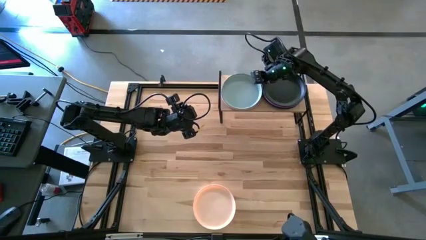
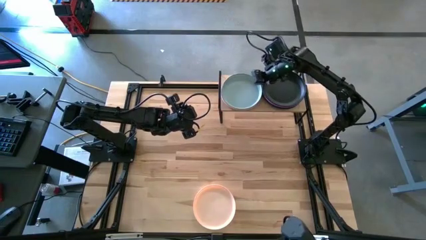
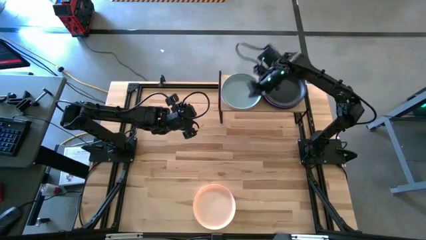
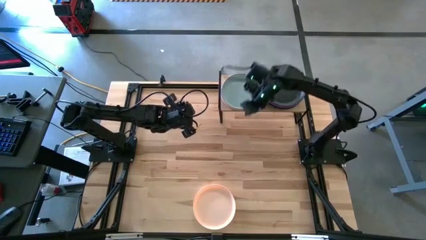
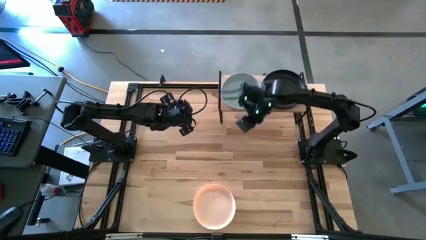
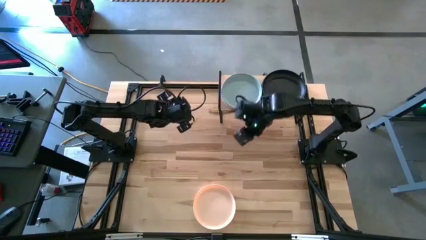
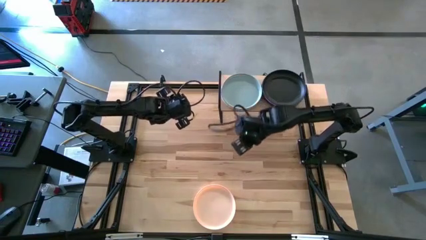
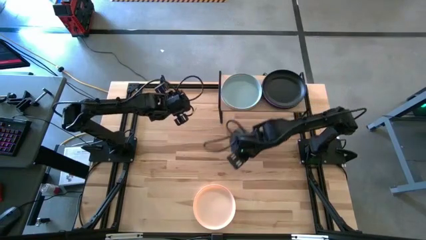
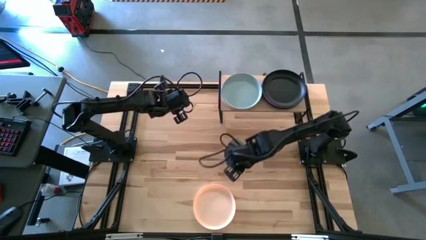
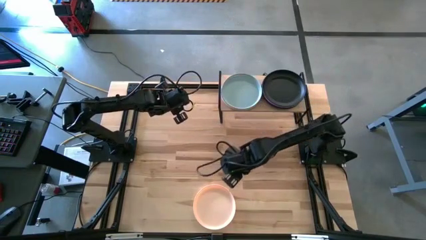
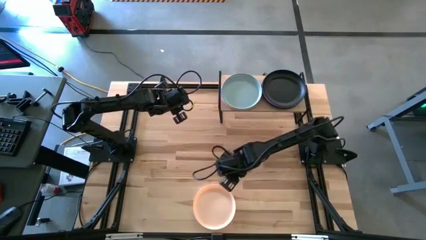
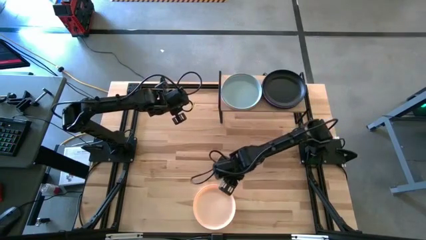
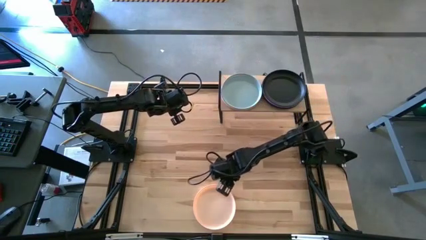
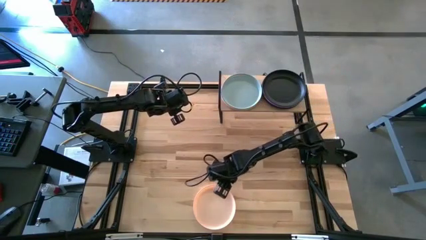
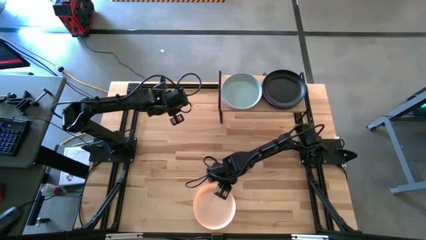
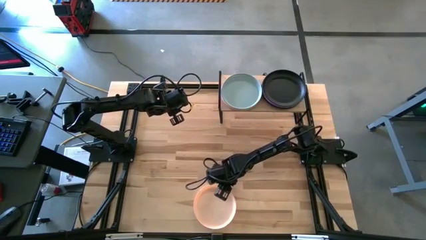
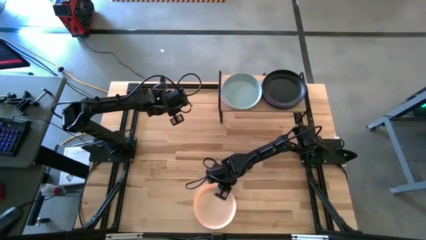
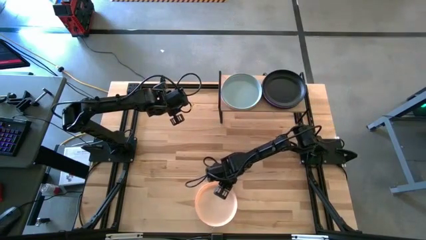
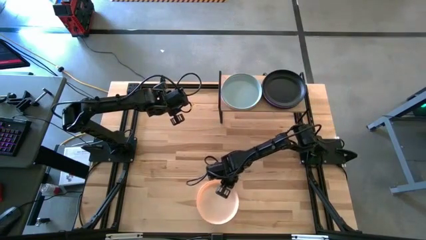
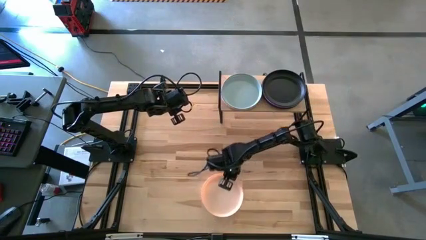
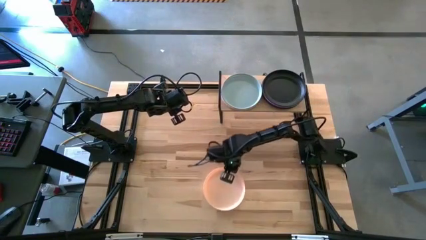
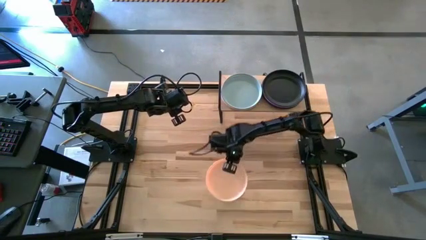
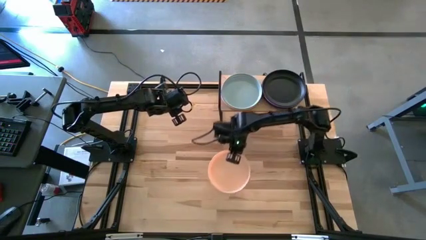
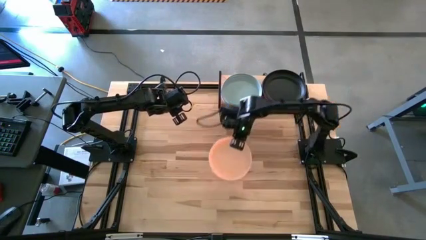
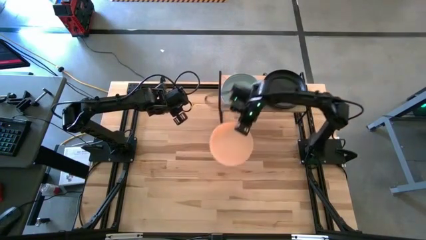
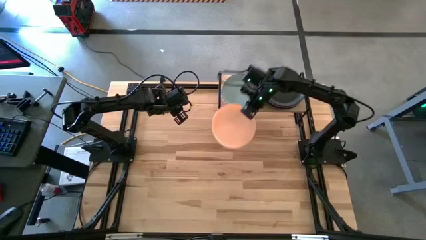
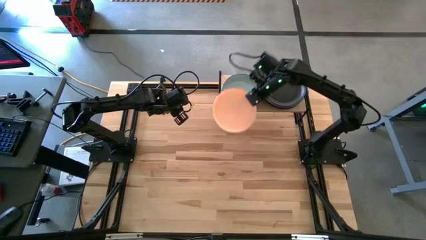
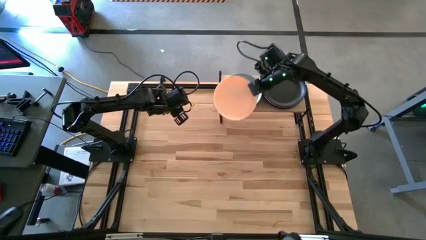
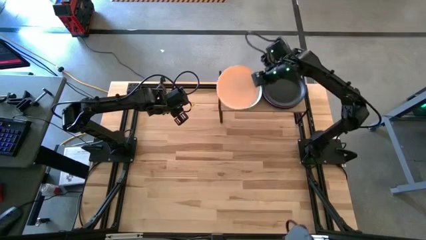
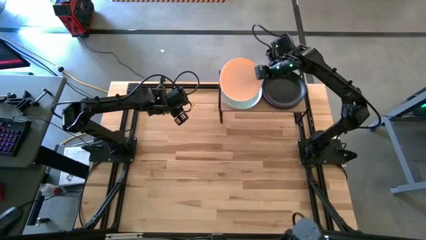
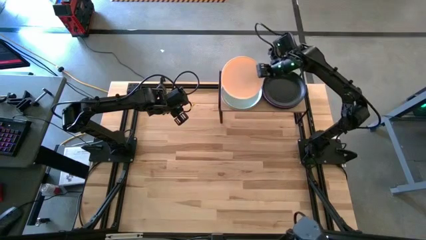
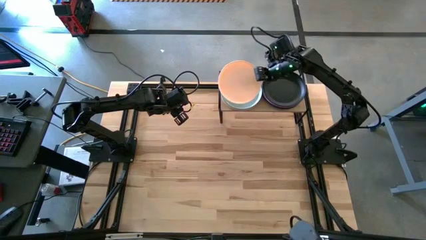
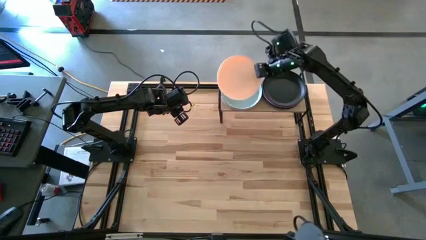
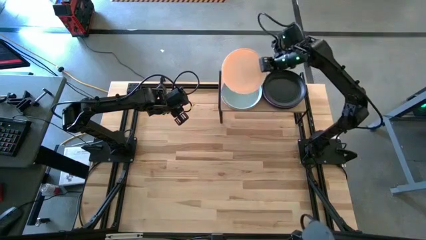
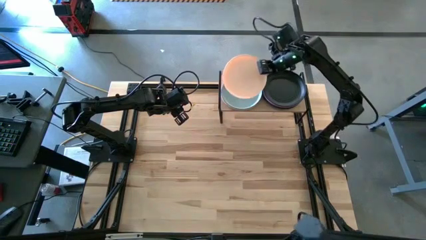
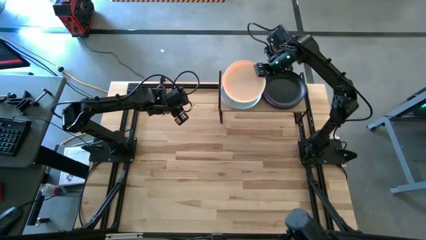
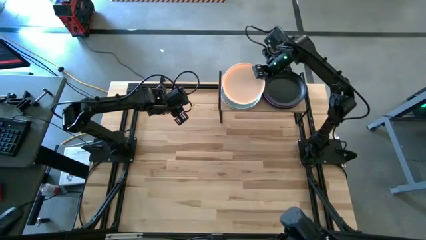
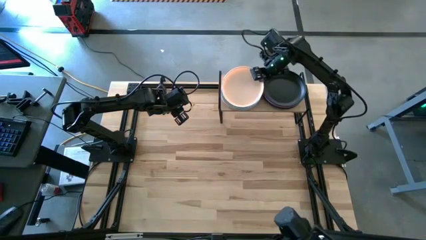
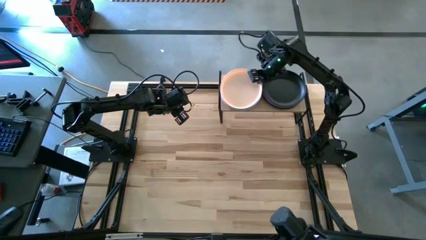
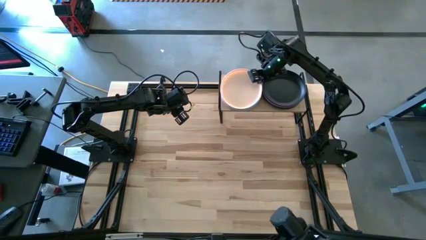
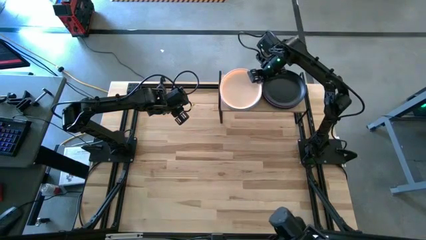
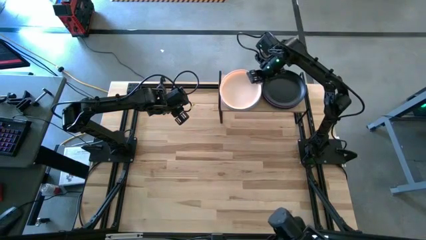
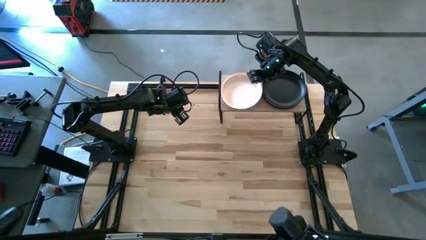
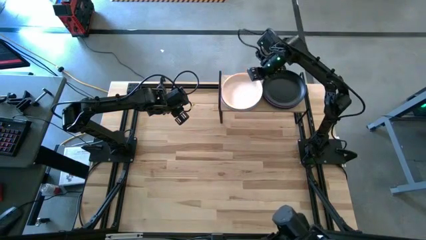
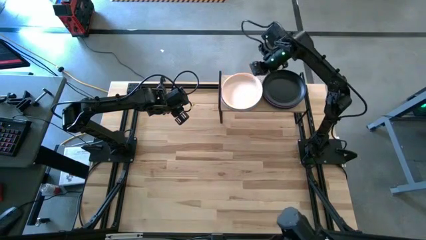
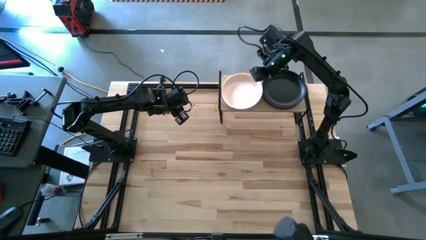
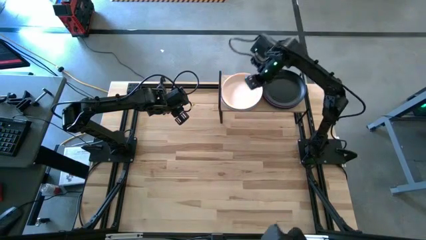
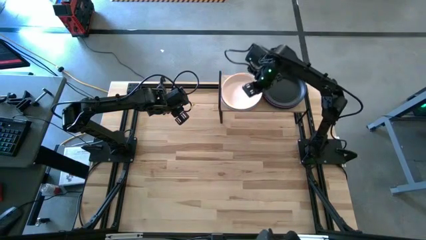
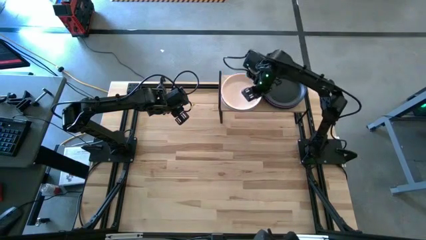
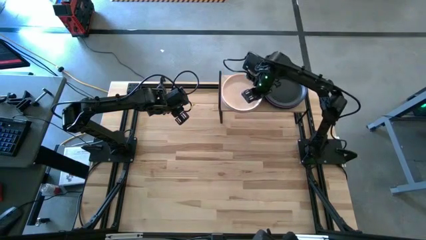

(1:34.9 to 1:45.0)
Task: Place and stack plates onto a shelf
Stack the light orange plate on top of the blue plate on the shelf

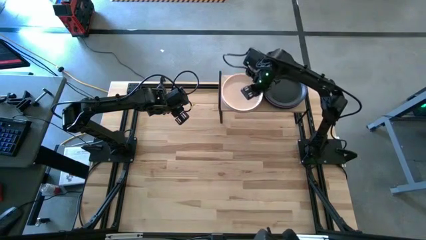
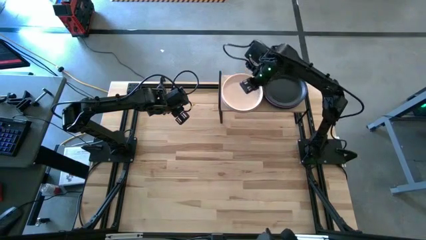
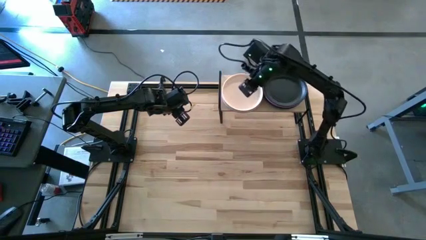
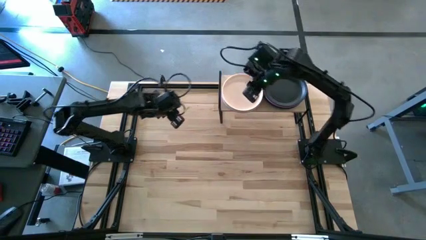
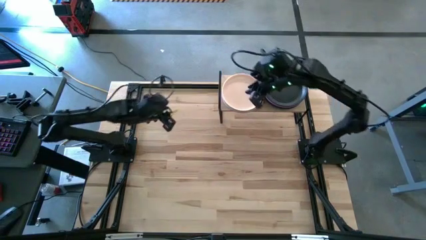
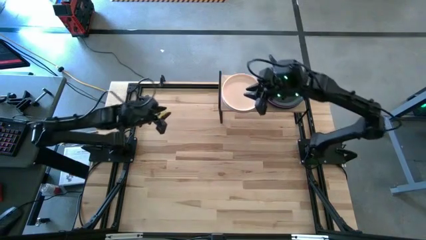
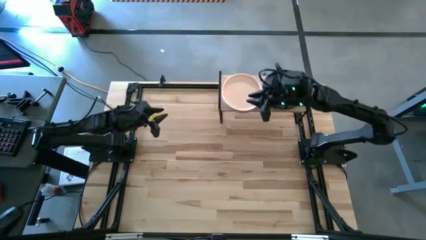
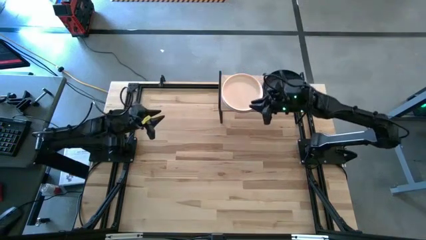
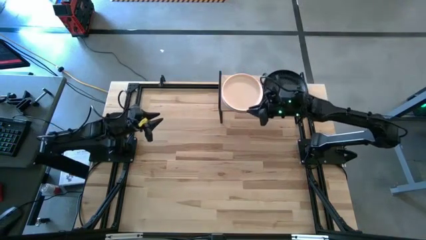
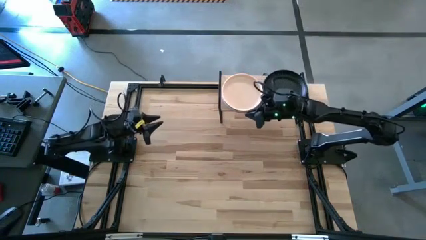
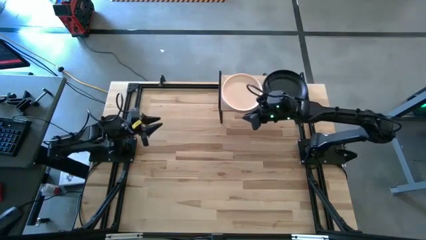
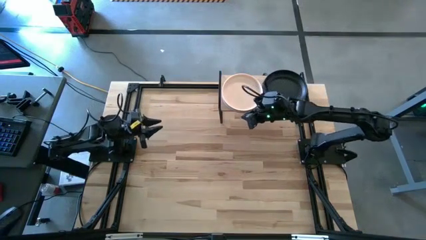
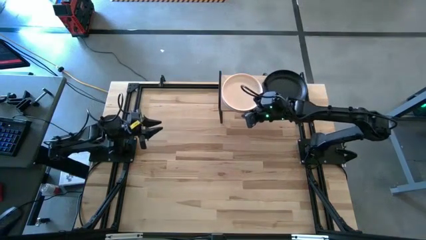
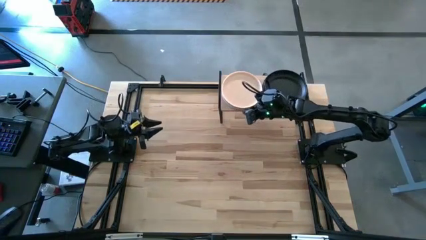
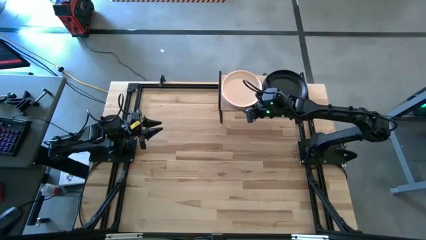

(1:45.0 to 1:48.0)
Adjust the plates on the shelf

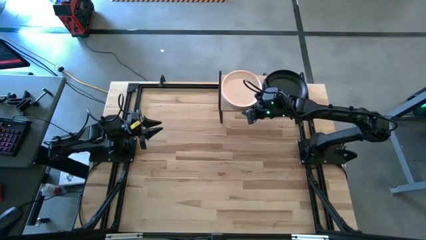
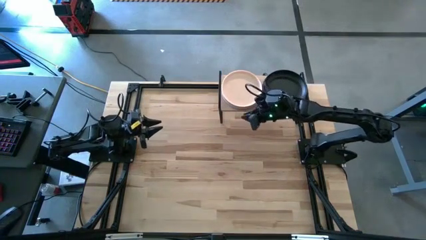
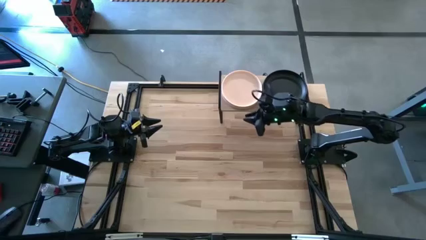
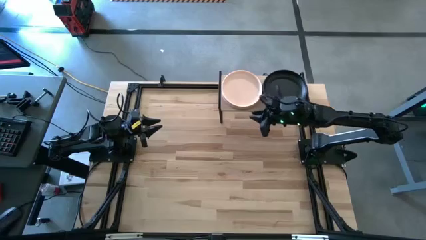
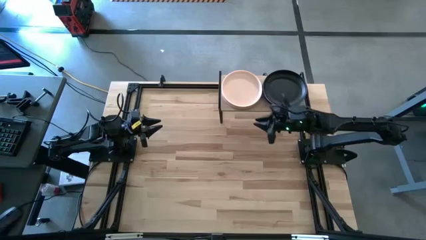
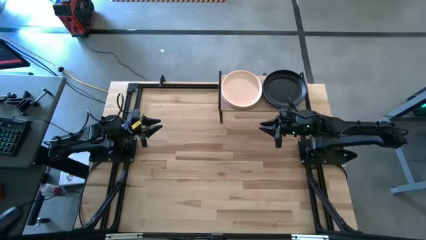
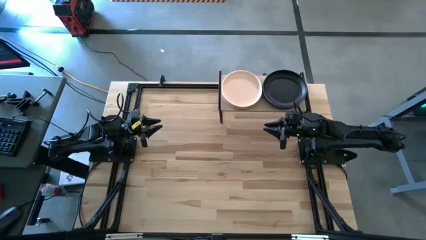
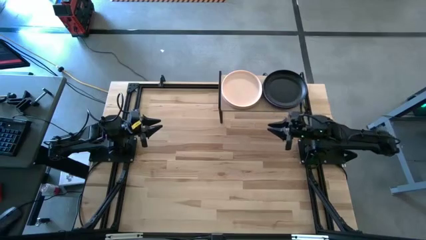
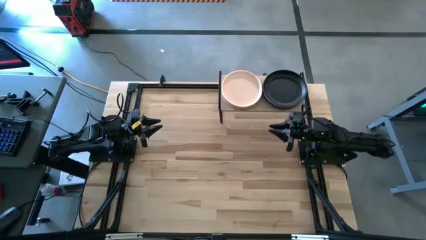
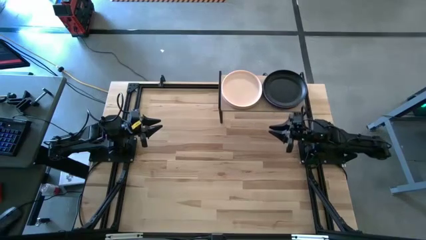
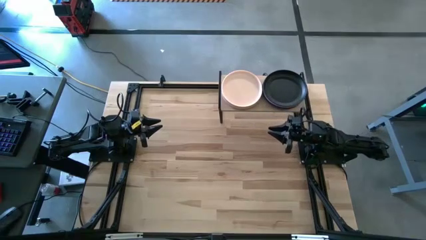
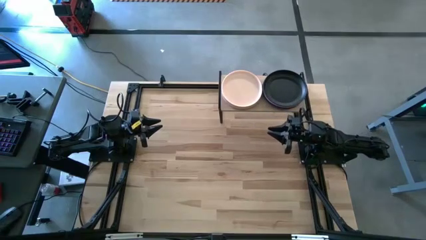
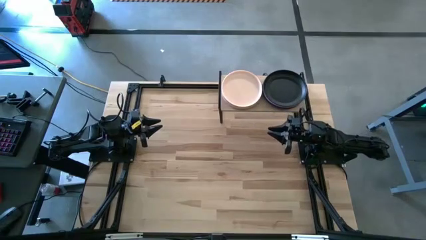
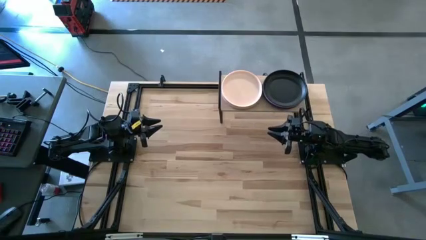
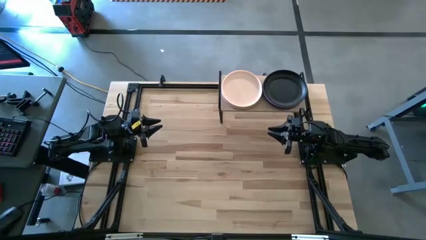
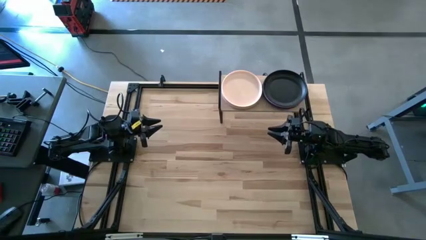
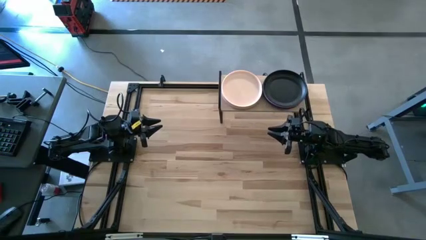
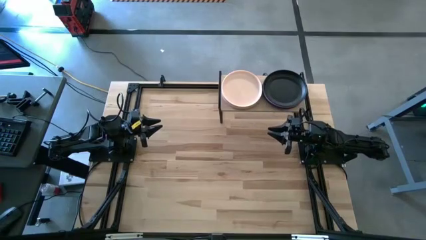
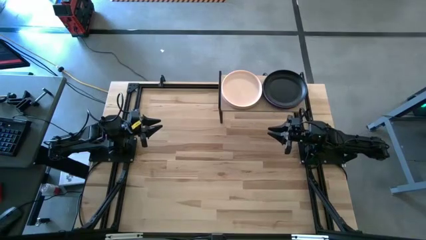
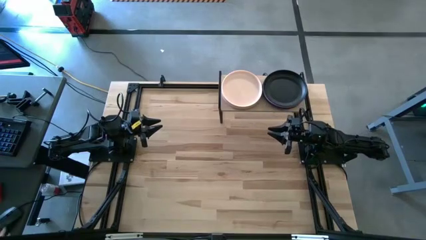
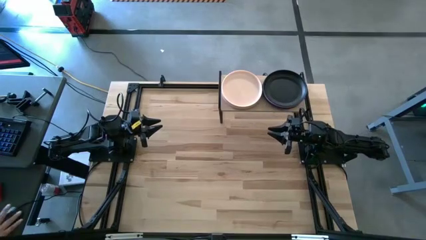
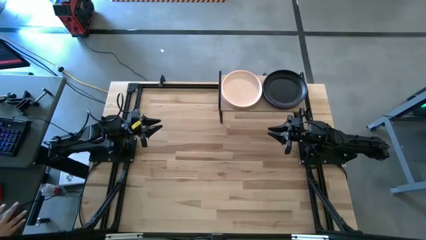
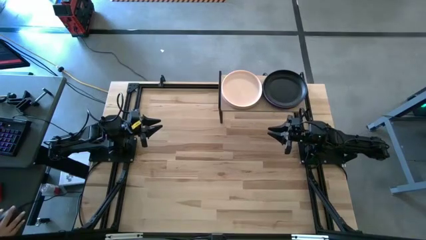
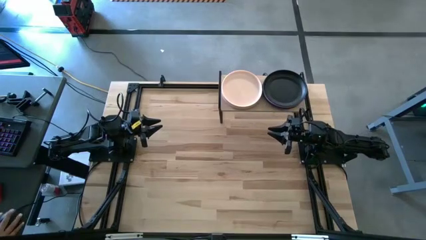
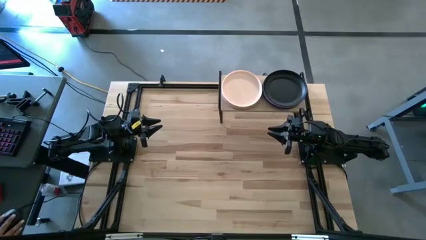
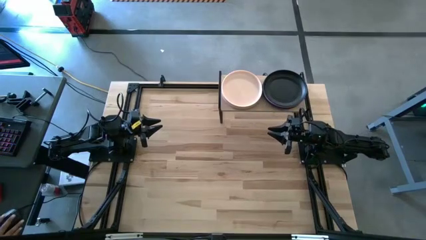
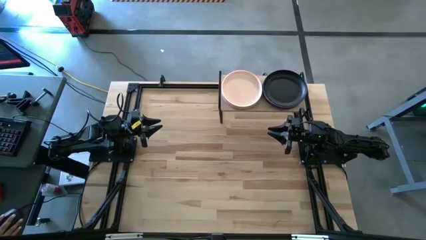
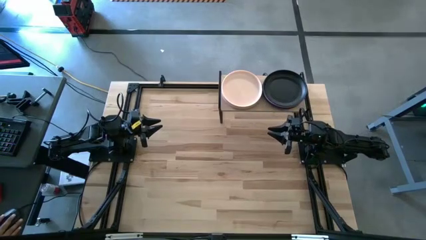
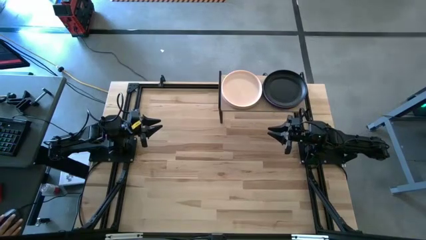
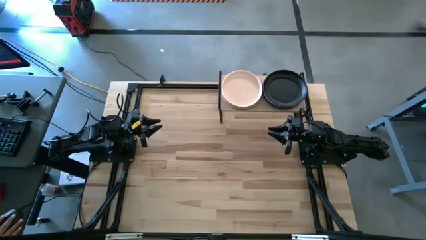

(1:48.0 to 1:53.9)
Return to Home Position
